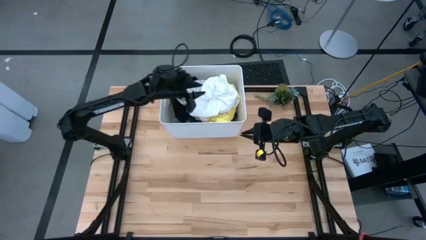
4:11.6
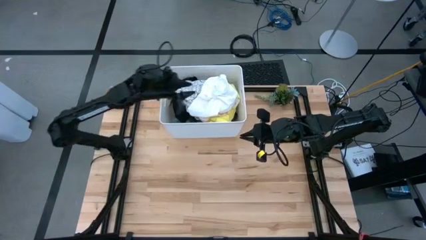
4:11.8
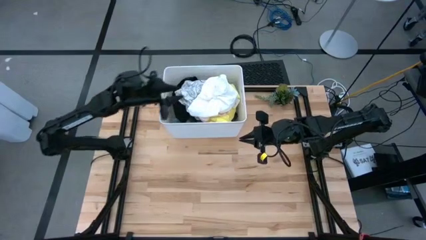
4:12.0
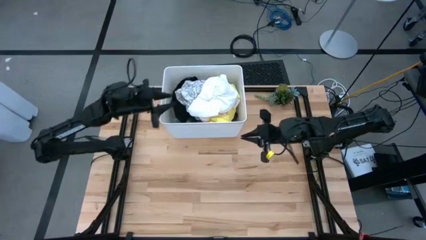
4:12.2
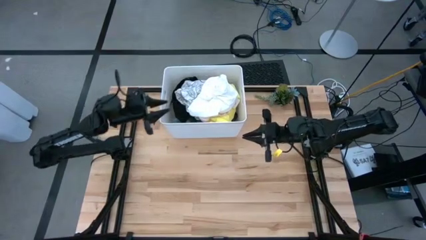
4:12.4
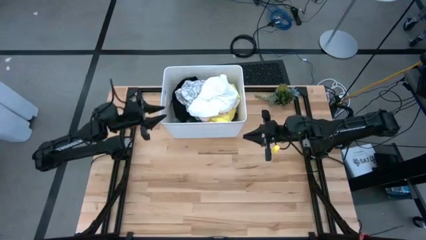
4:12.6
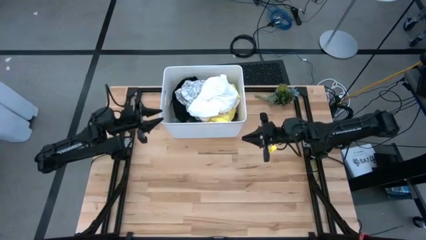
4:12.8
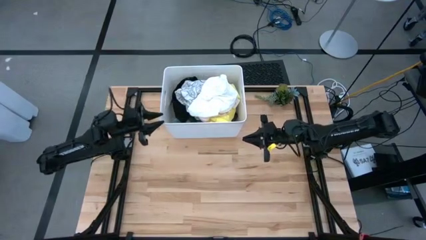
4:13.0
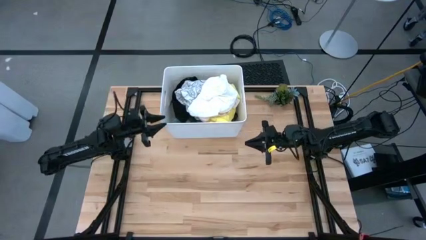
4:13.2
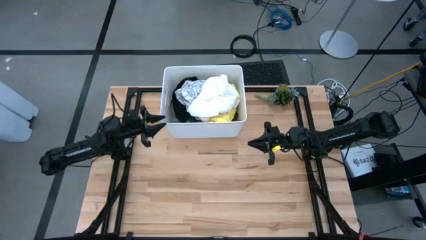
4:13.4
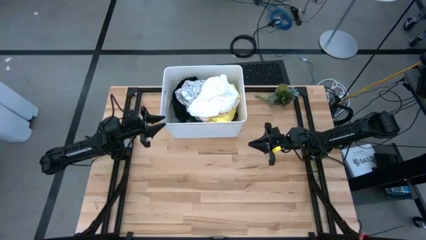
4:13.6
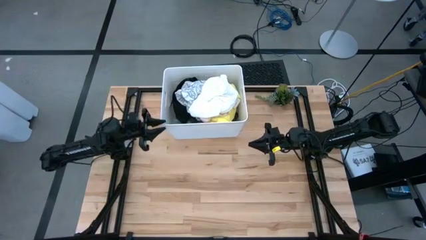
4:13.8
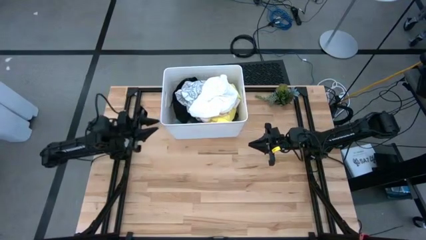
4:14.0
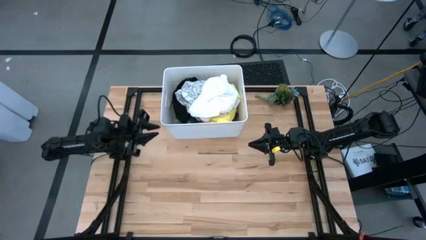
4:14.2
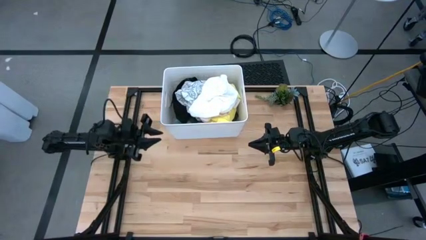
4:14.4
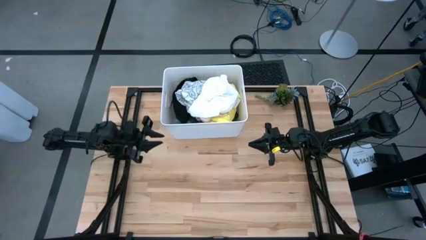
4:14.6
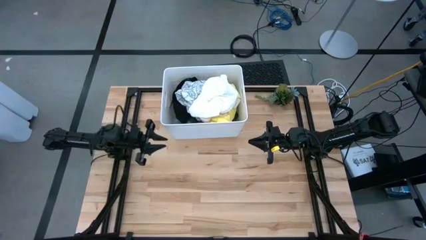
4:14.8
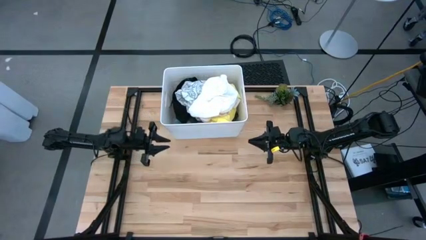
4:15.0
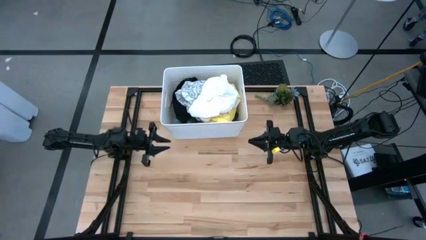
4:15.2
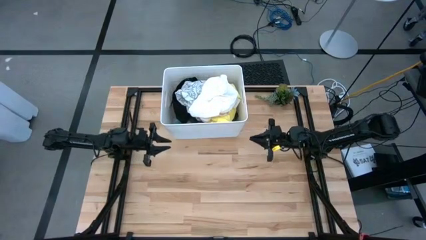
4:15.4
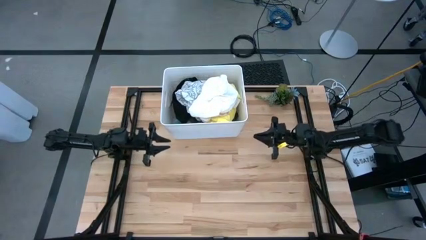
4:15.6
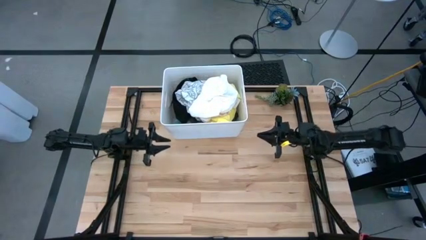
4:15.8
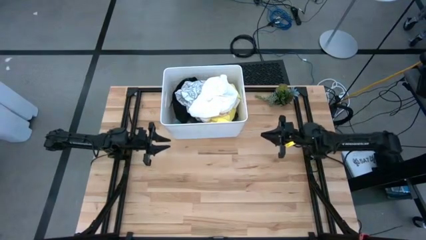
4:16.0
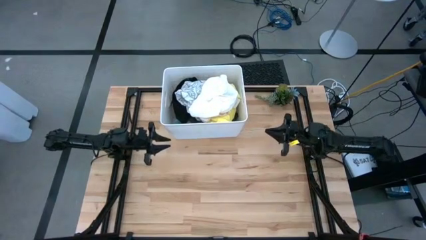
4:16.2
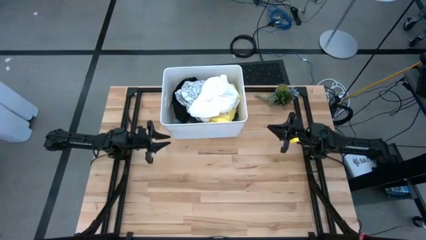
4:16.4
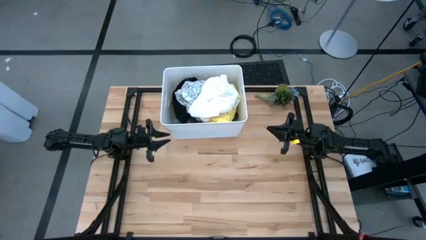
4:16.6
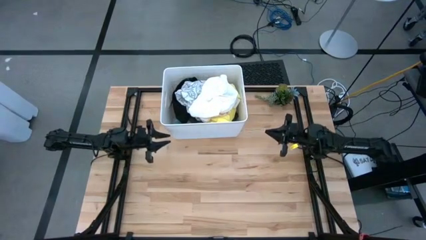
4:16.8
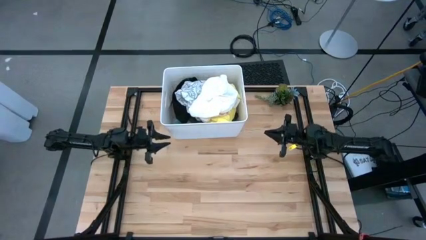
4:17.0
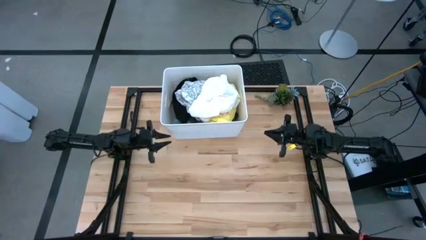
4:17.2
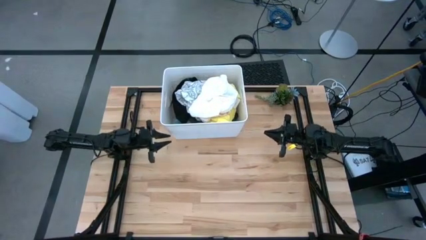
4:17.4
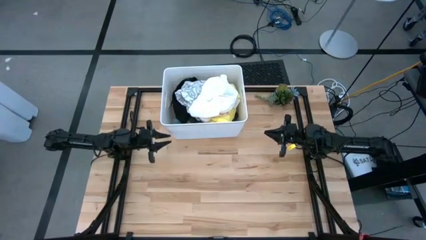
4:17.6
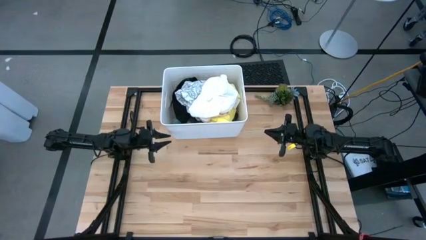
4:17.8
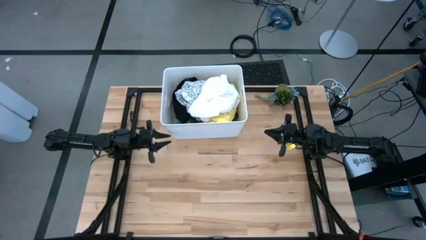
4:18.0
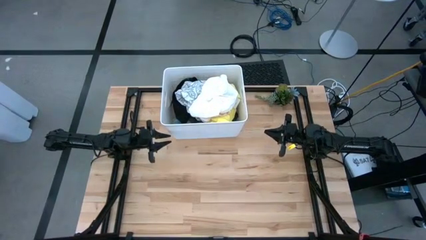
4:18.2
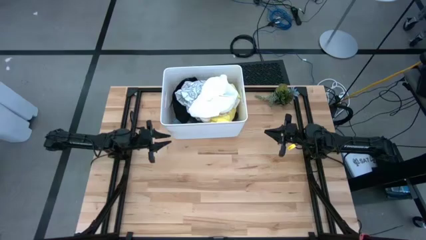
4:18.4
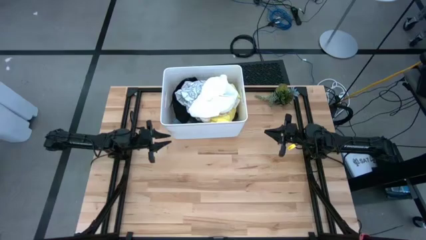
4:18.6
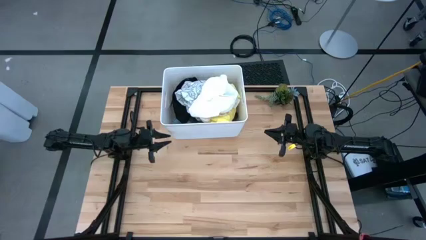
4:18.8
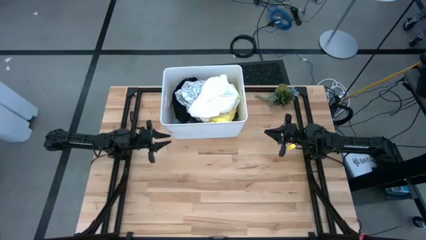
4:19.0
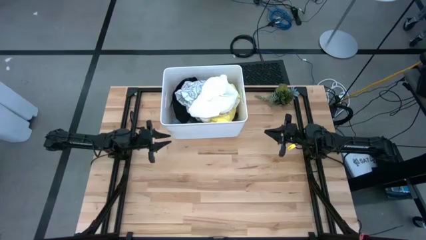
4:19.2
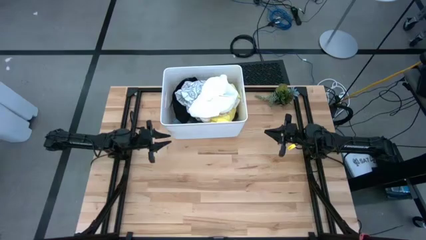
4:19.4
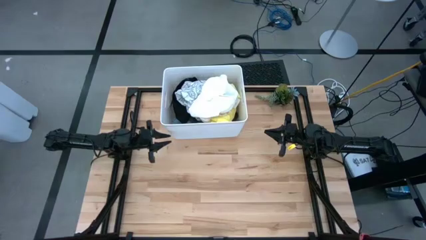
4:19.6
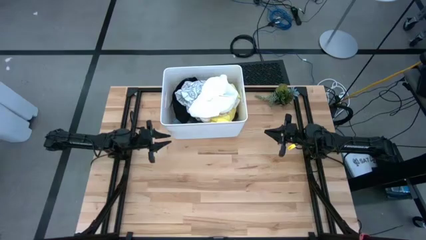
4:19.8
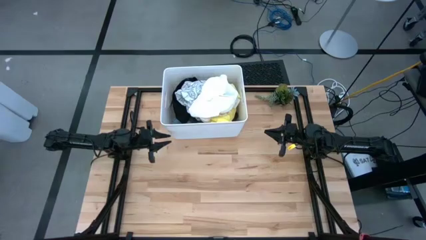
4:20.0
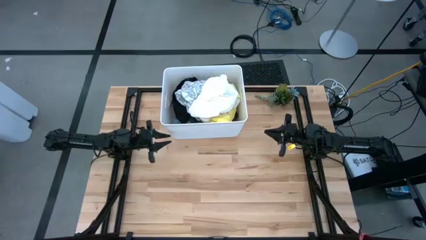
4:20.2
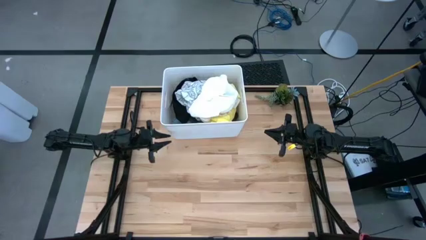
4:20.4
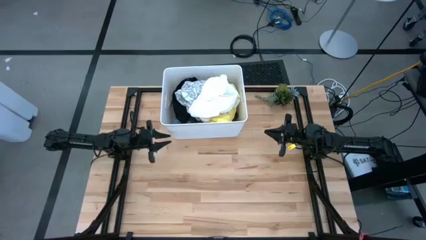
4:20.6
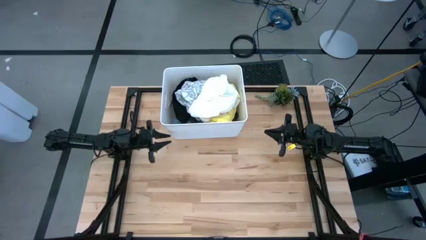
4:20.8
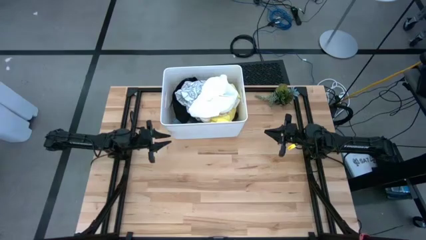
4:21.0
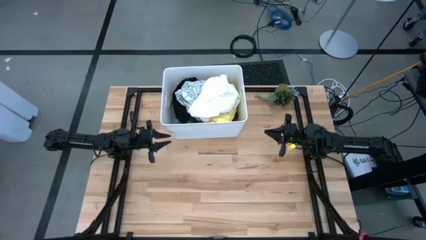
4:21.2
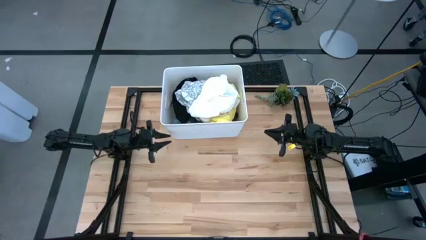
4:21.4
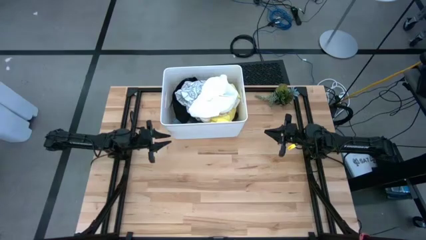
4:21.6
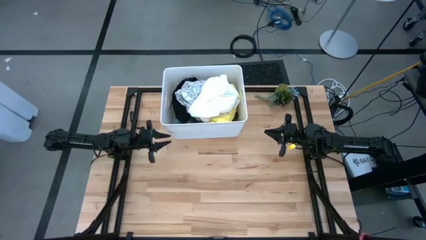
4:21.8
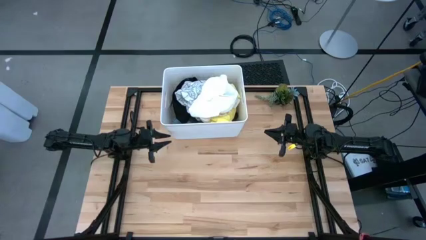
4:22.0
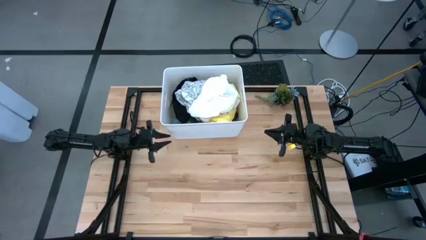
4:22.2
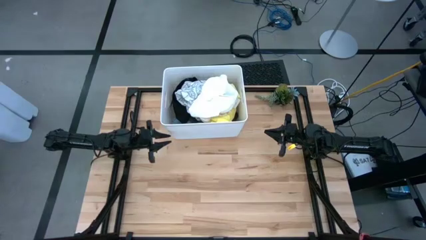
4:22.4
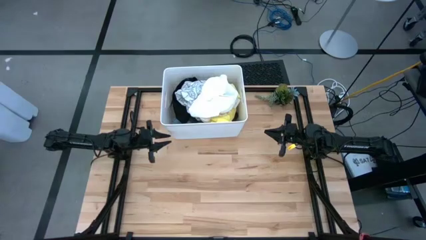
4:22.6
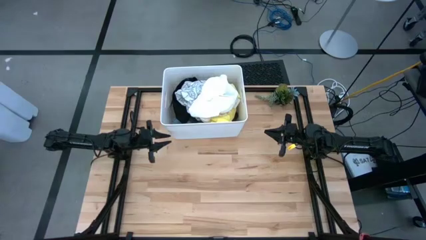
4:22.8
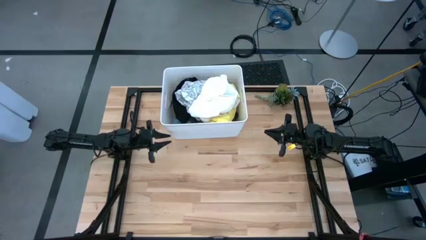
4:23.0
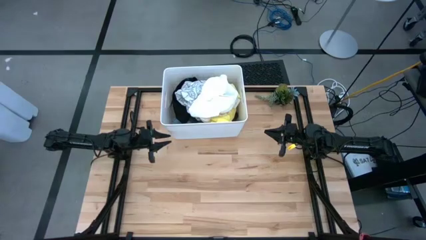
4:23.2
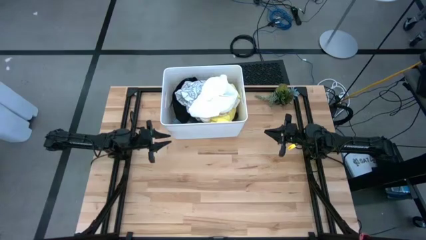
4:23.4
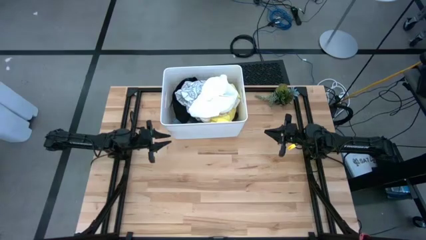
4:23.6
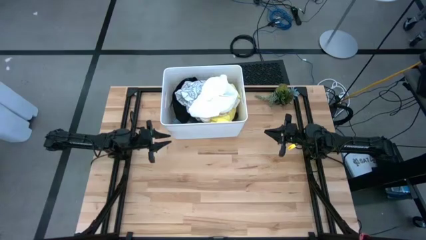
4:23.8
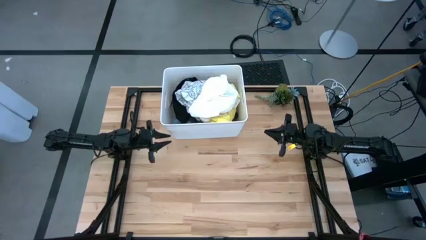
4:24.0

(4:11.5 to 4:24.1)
Task: Fold laundry
Return to Home Position

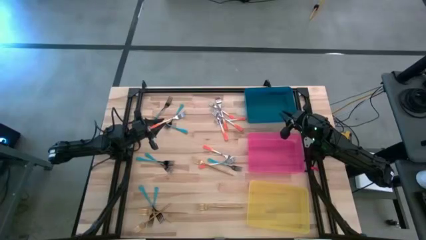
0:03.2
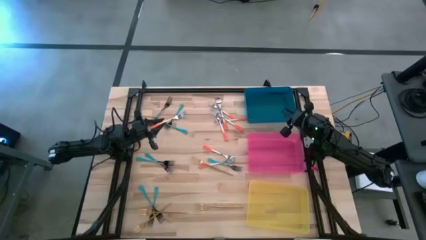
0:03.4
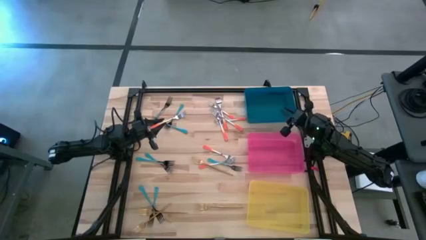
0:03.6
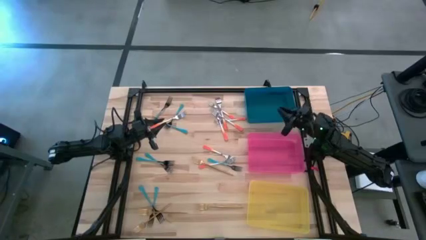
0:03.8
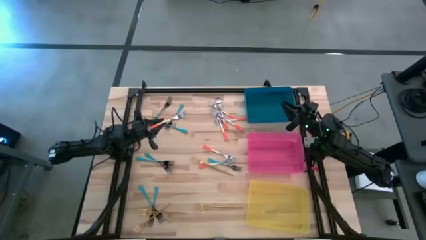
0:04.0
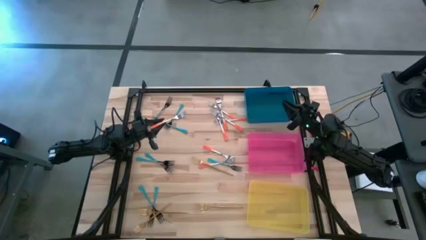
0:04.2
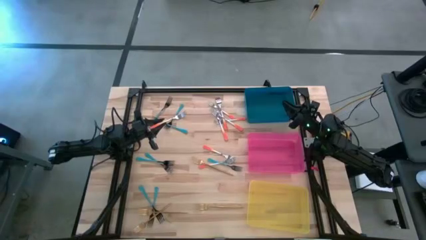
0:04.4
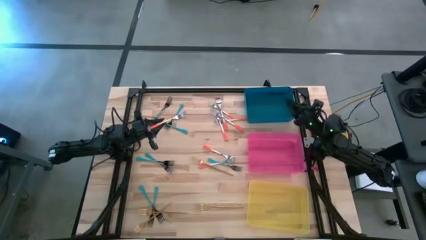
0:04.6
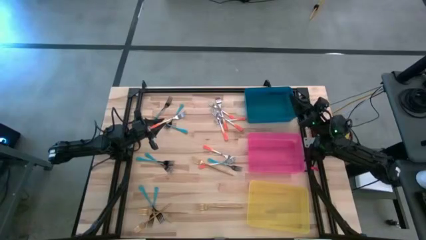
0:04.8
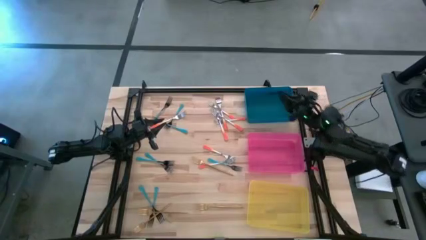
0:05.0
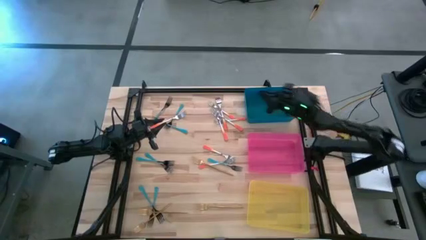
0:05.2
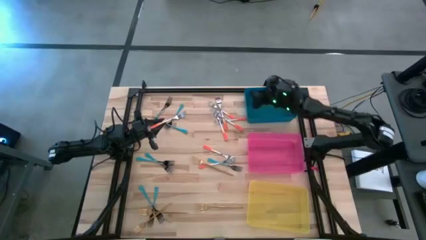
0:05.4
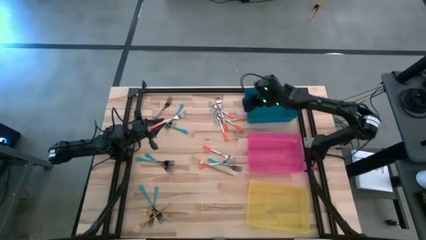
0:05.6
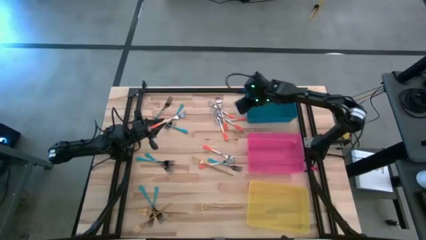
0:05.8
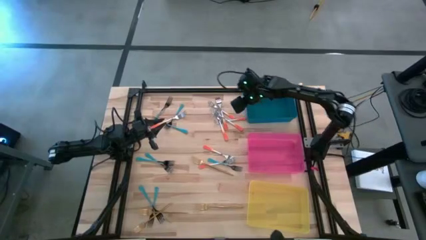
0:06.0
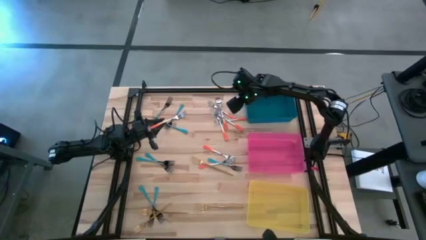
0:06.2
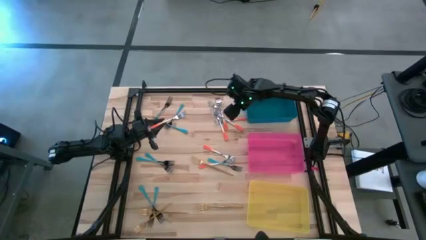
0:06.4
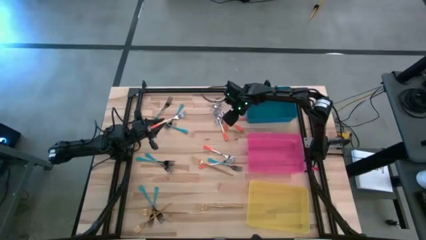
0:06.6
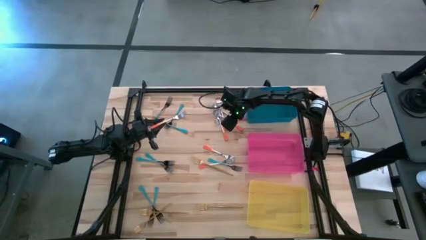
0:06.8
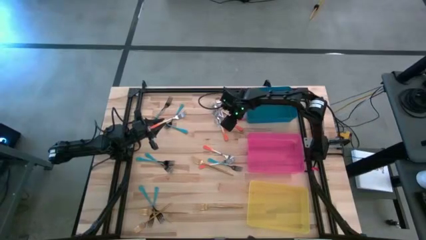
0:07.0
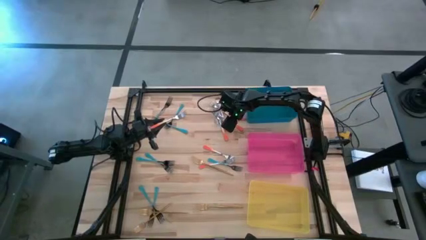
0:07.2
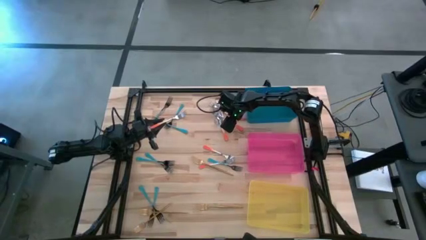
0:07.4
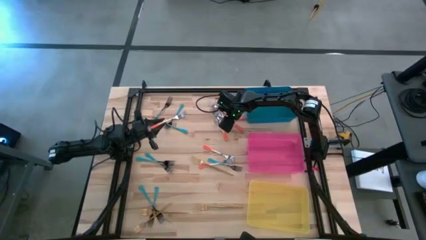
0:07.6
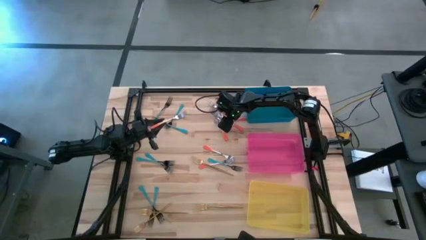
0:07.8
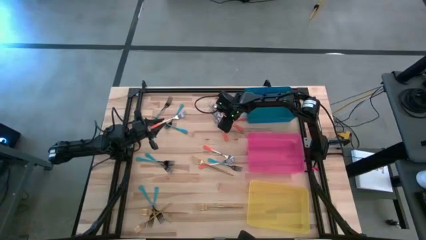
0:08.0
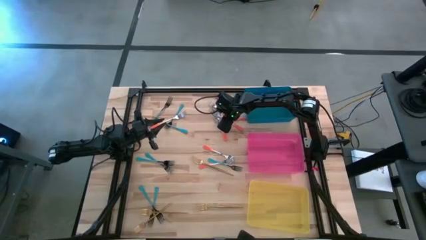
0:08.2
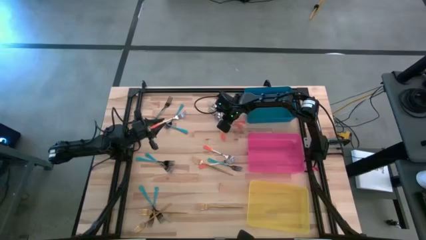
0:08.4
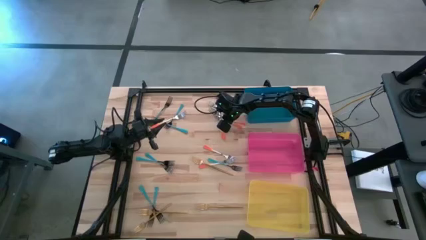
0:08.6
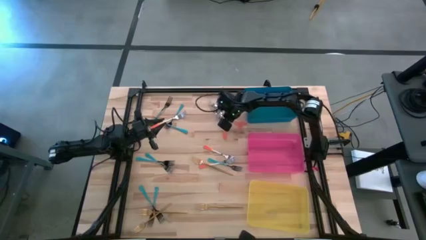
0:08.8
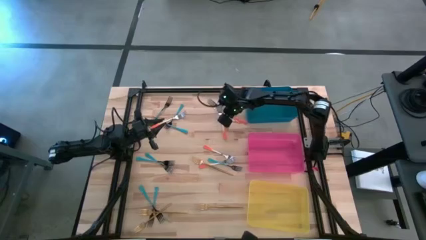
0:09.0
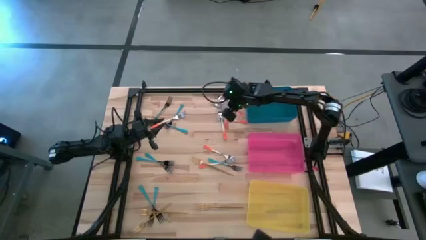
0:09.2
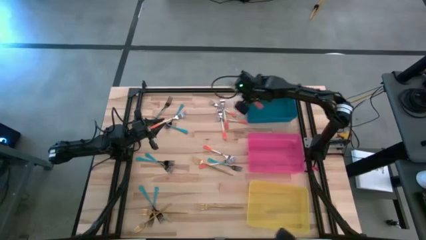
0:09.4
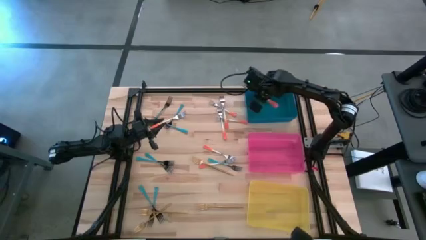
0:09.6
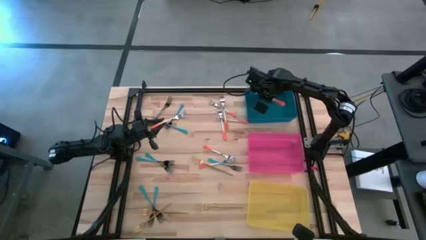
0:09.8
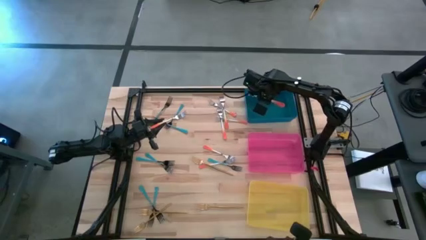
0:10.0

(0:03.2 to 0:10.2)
Task: Sort silverware by color (type)
Put the orange fork into the blue bin
